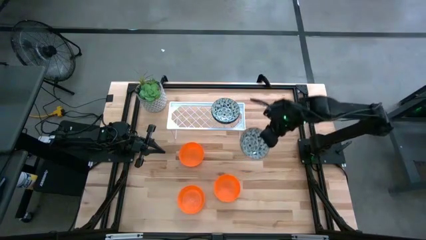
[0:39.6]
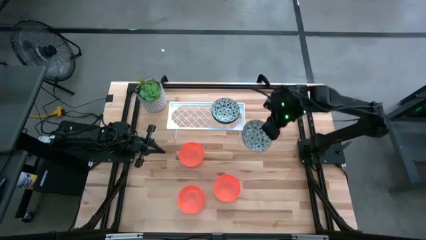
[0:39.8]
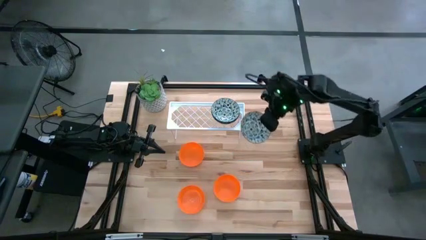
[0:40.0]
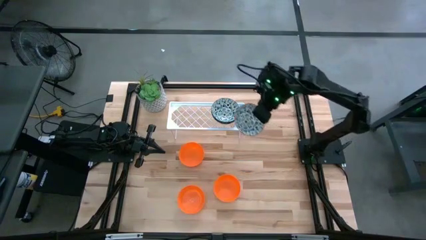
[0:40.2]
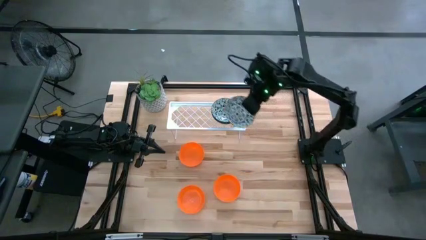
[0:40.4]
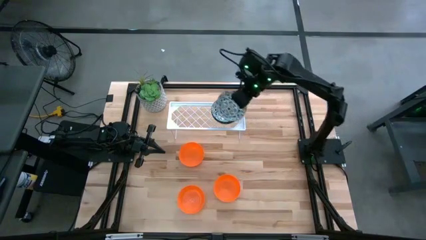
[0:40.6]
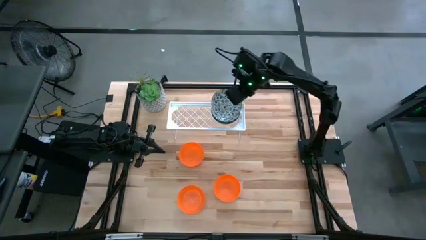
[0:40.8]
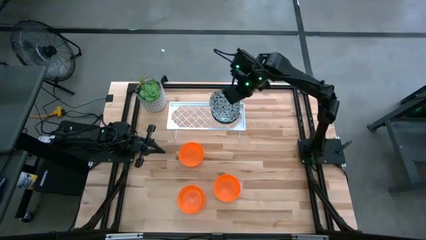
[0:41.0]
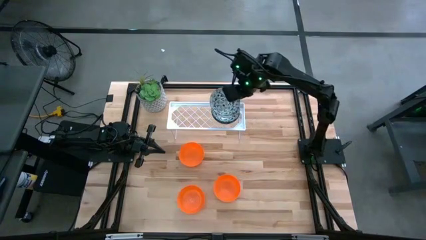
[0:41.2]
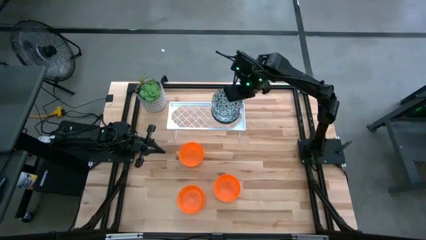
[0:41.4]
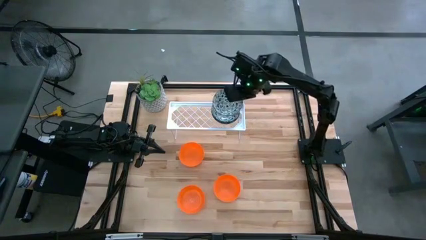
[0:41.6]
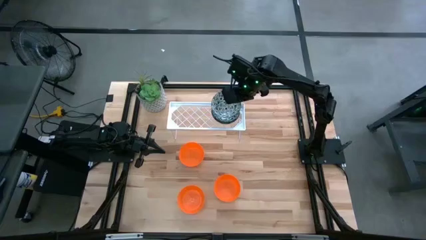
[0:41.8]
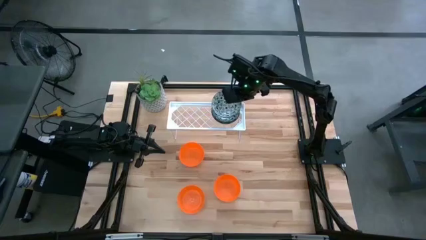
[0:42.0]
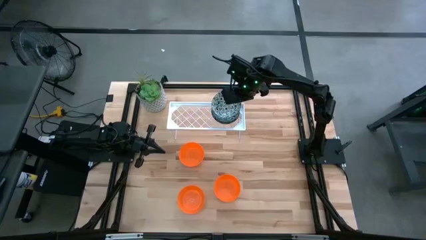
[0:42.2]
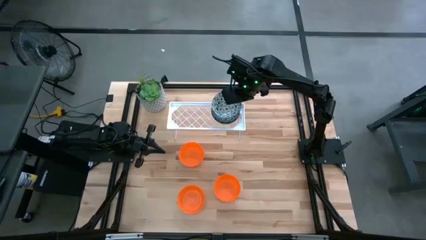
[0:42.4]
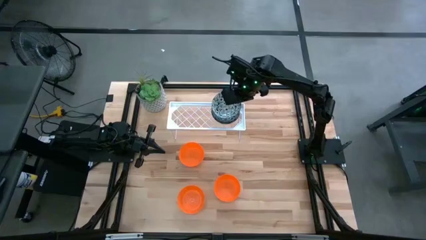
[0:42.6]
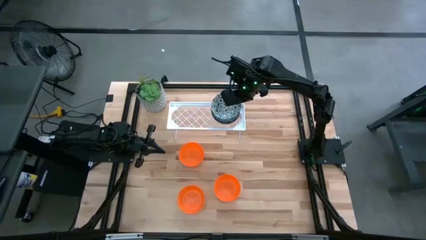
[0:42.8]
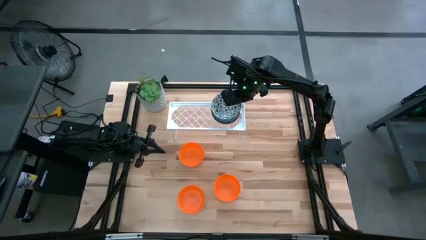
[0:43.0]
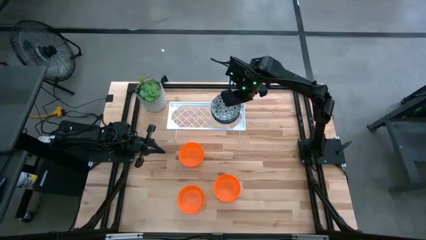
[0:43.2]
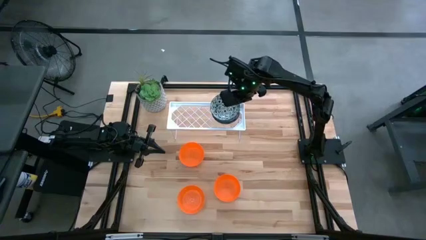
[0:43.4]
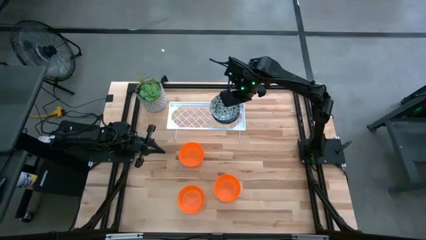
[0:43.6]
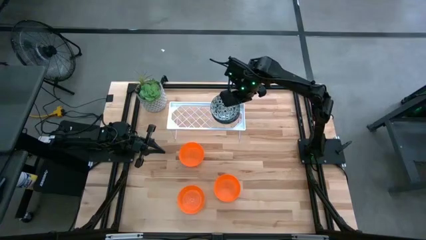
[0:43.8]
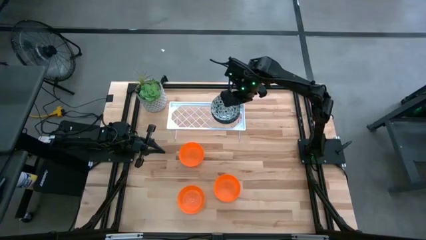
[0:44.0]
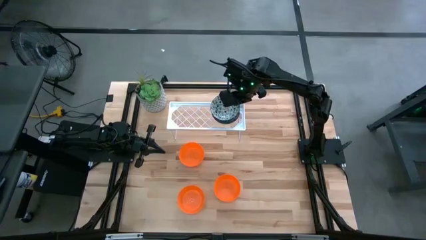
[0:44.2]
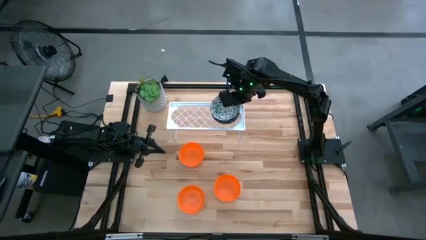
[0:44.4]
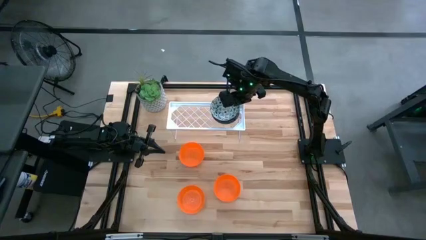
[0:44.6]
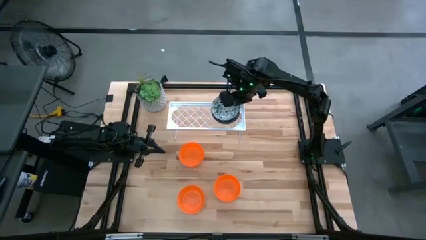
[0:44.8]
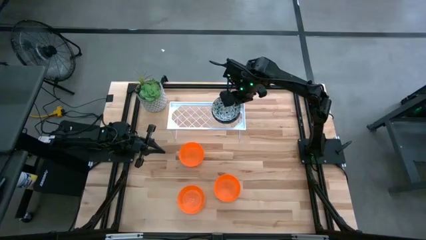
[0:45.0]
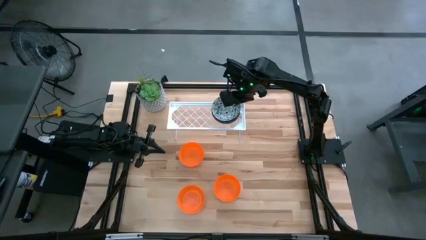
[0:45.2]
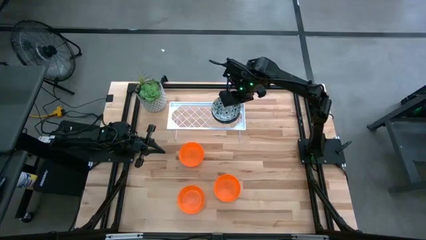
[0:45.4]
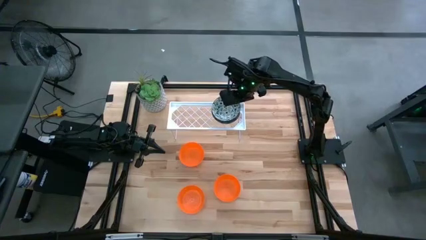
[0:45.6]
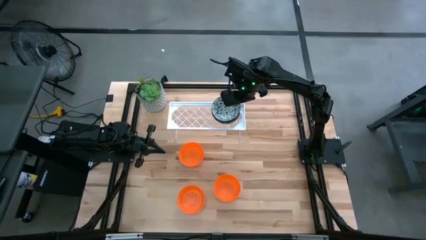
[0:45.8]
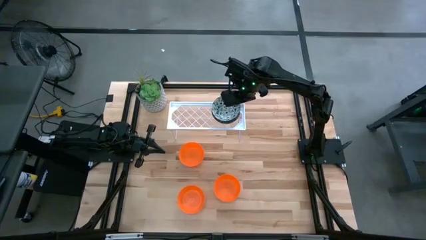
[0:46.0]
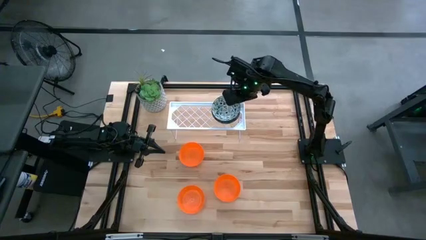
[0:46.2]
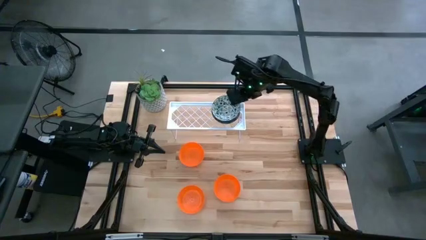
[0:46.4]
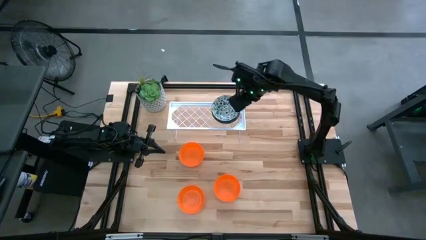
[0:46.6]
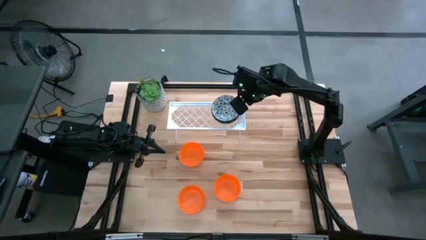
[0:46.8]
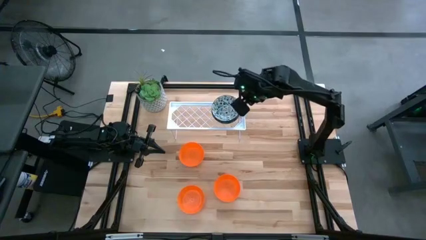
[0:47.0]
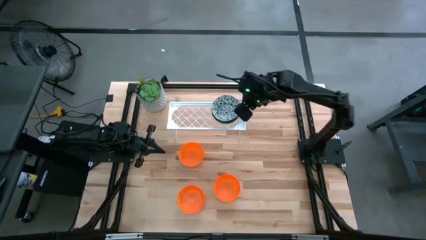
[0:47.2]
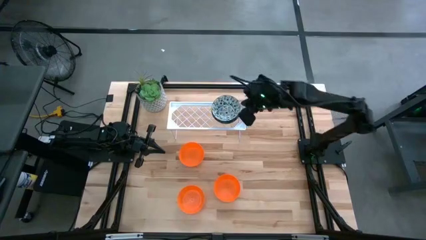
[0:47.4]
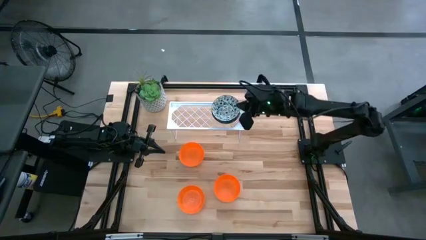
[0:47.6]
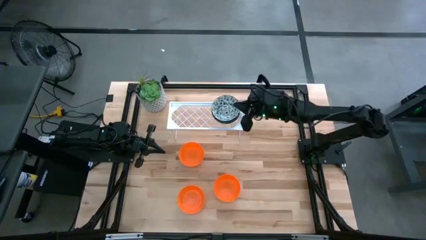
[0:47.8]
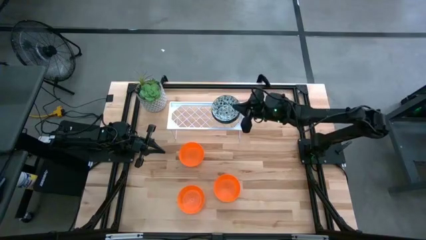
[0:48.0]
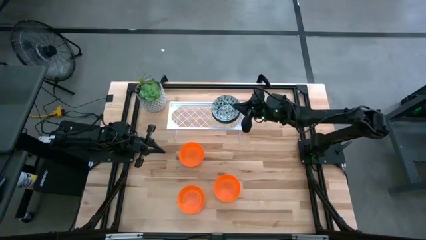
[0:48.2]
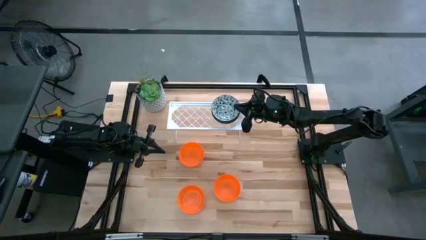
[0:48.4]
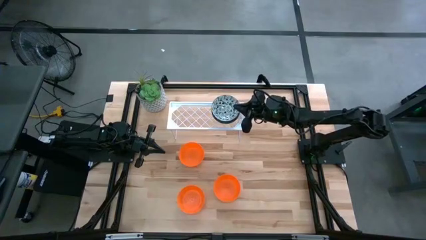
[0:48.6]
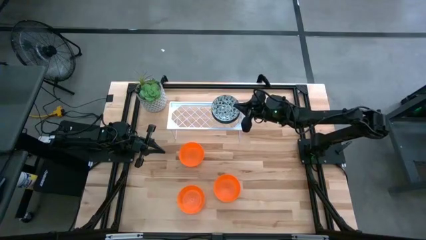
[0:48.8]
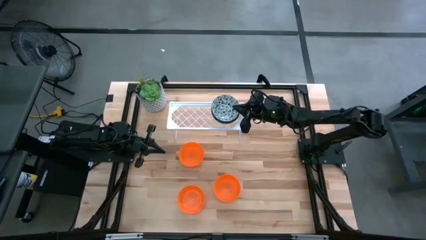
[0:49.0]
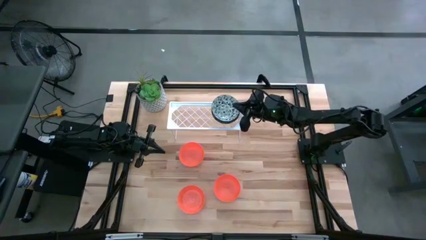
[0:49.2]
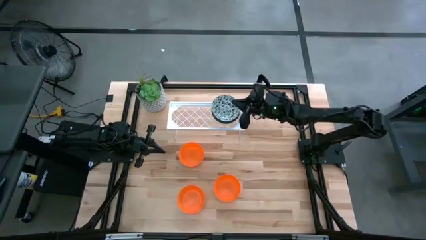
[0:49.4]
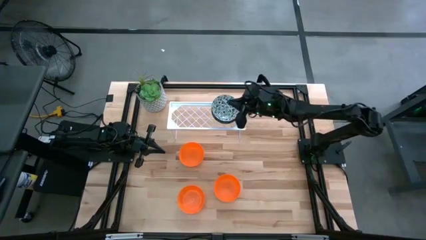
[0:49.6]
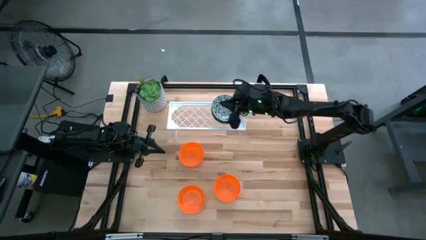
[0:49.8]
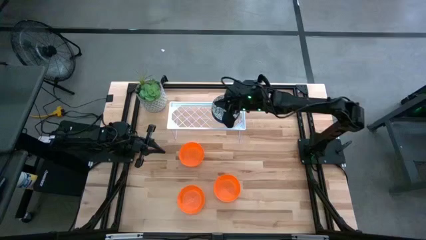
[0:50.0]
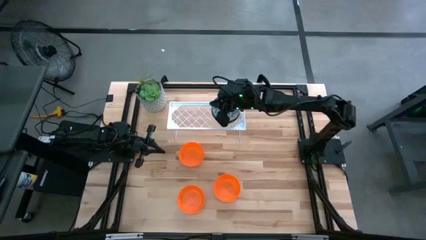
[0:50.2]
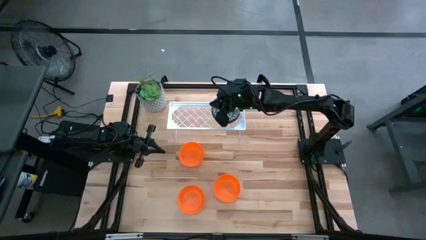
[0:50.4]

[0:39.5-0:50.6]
Task: Pick & Place Mini bowls
Stack the white patterned bowl on the white patterned bowl on the shelf

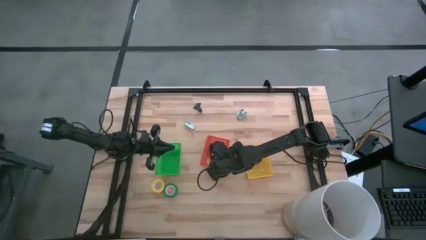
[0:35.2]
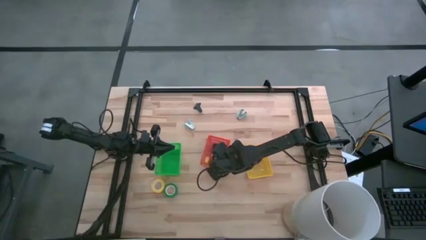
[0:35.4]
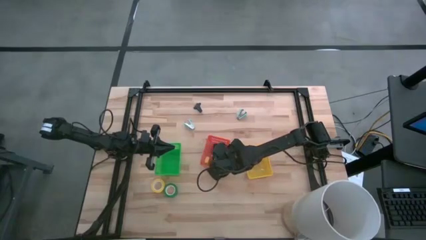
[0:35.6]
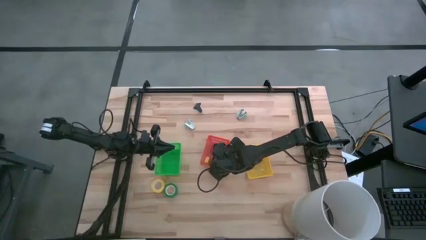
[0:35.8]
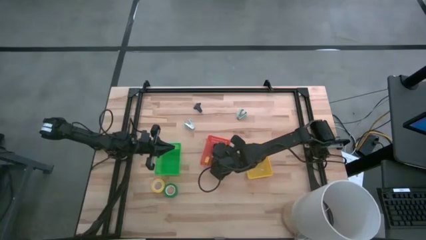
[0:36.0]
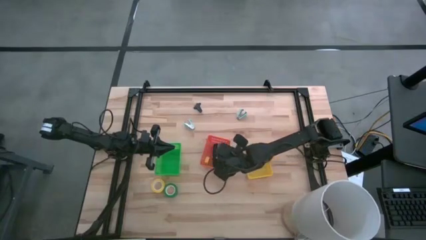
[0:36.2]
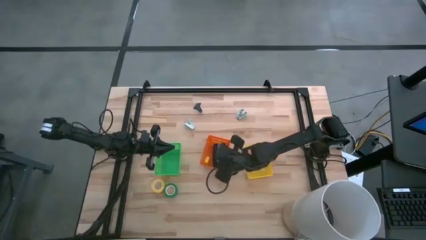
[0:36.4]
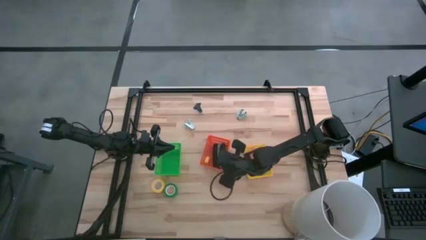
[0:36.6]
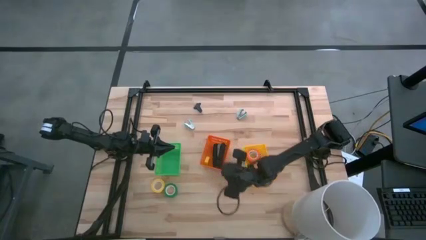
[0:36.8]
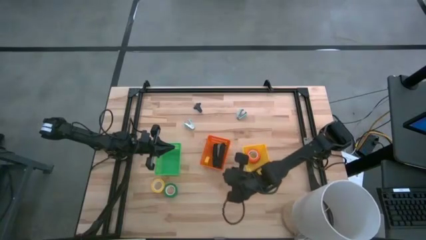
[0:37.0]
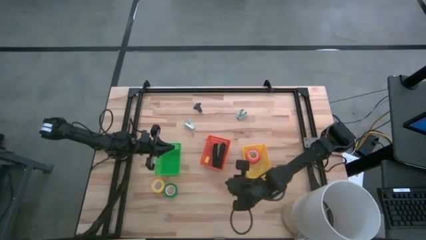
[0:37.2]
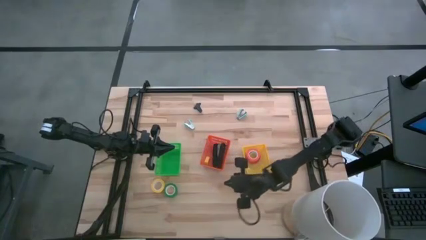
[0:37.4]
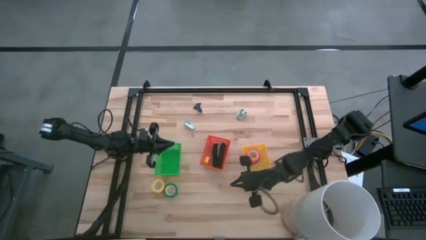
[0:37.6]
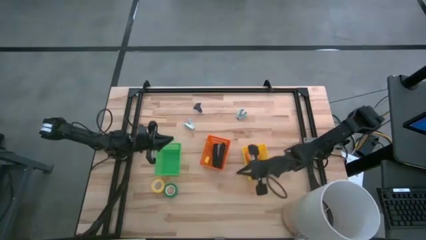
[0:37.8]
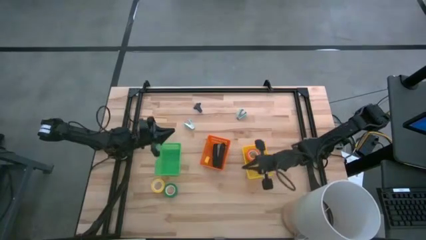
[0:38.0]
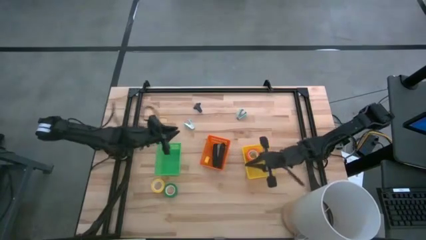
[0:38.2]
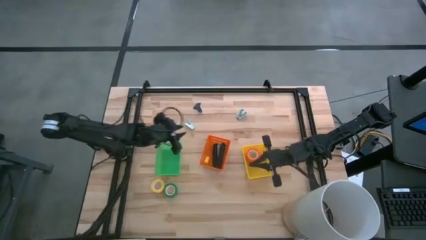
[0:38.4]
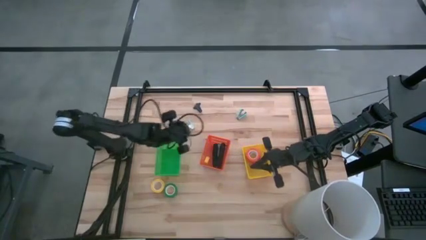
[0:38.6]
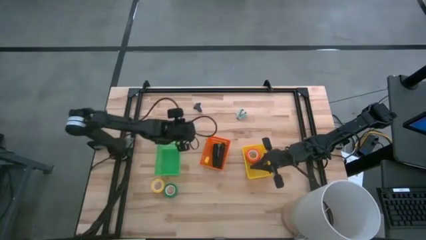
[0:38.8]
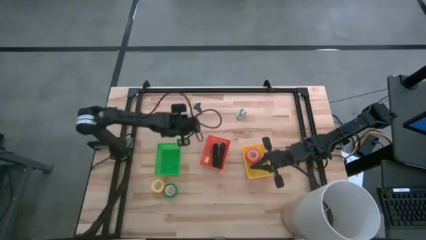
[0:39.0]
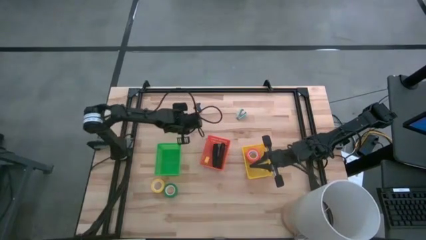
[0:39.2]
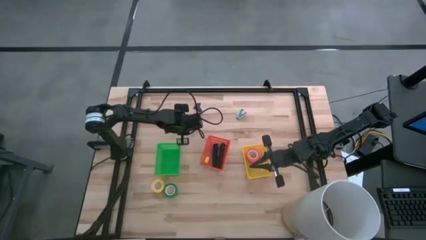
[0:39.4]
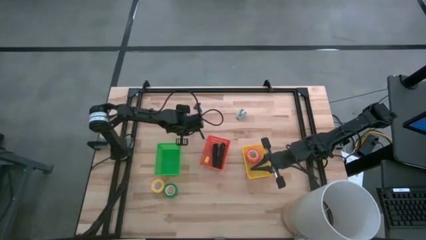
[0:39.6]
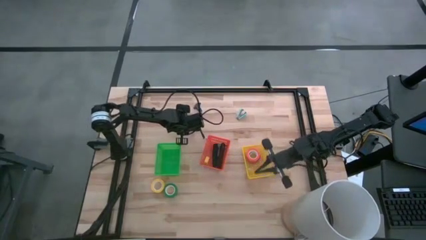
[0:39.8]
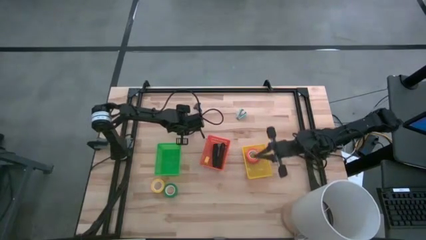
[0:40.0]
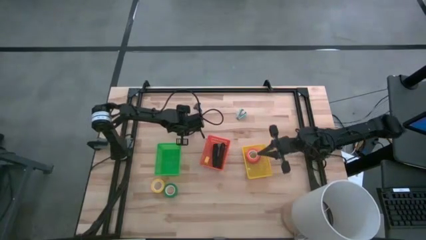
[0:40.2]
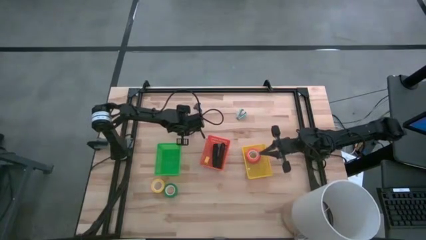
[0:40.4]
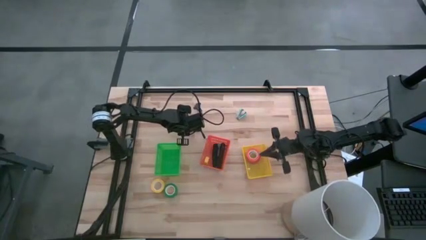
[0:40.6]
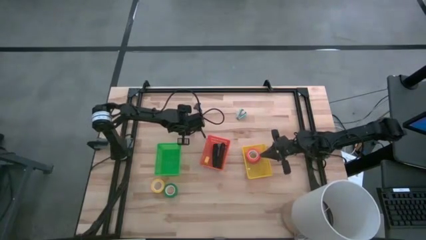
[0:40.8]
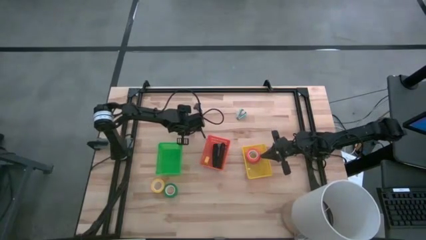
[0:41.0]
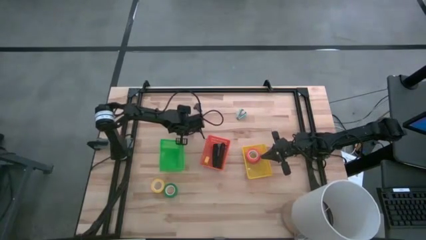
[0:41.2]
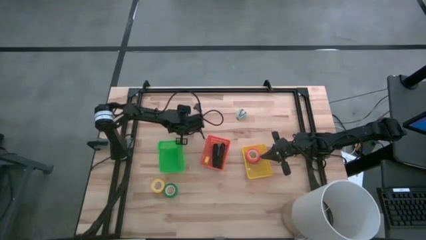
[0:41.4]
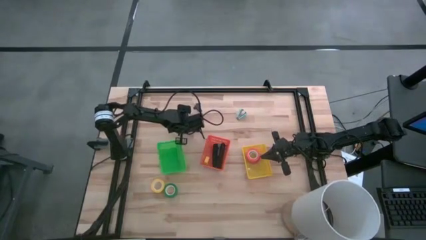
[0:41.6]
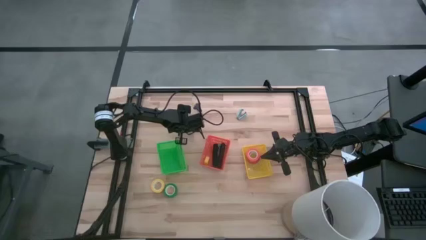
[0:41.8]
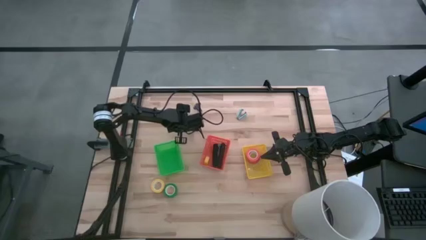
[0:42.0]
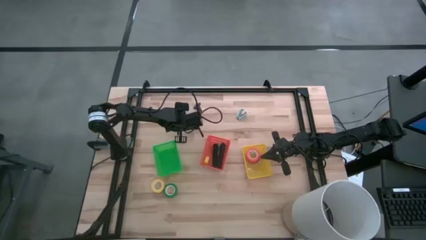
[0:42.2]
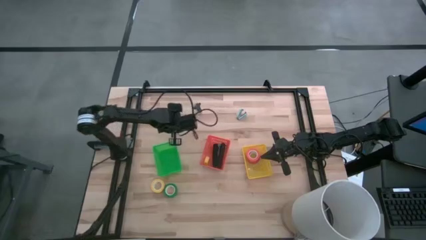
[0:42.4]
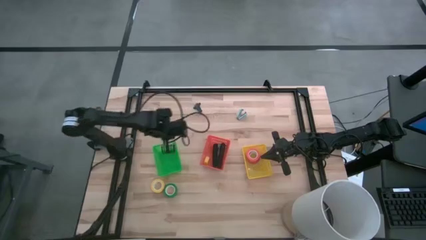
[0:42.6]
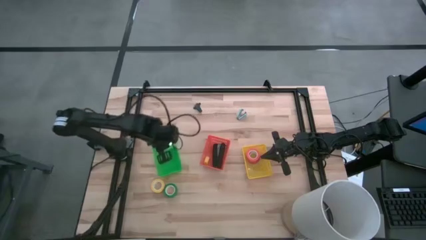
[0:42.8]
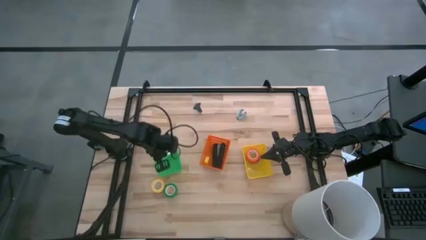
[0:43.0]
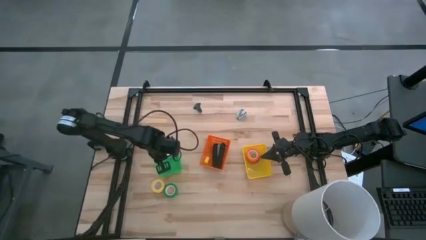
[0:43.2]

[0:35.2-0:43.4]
Task: Pick and place Stapler, Stapler remover, tape
Put the left light blue staple remover into the green bin
